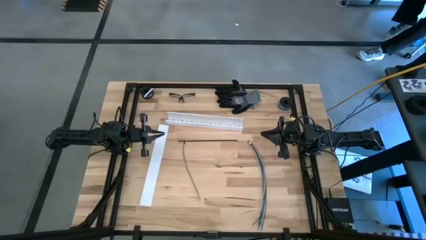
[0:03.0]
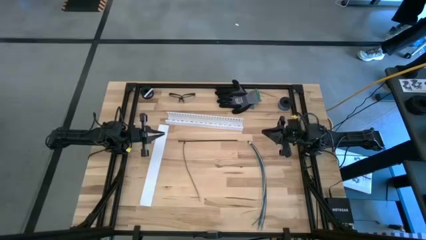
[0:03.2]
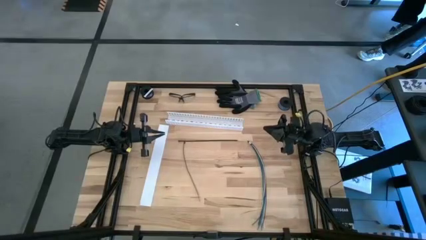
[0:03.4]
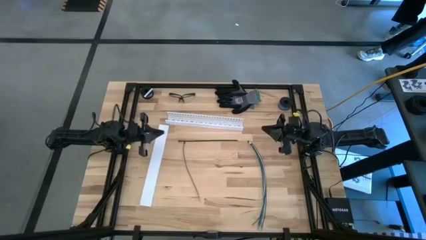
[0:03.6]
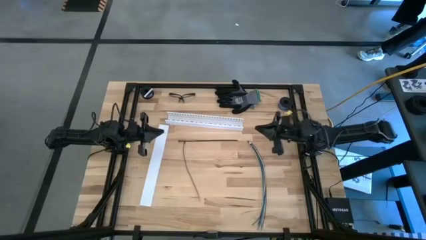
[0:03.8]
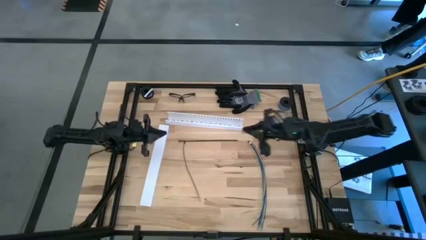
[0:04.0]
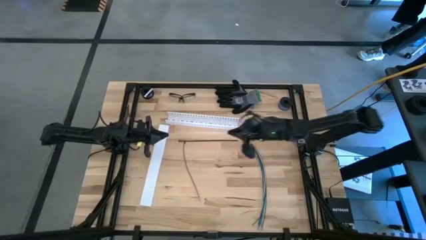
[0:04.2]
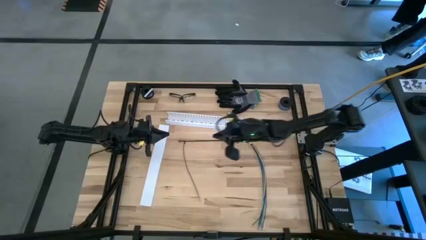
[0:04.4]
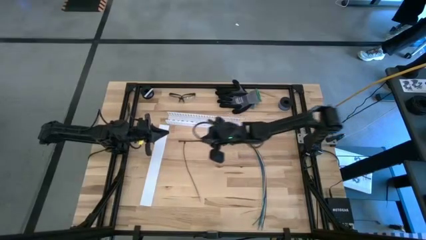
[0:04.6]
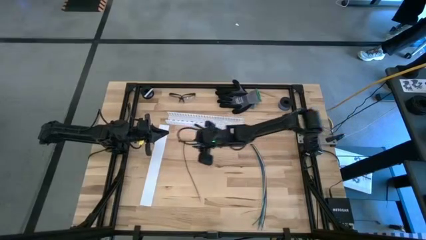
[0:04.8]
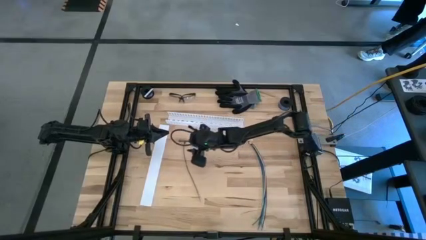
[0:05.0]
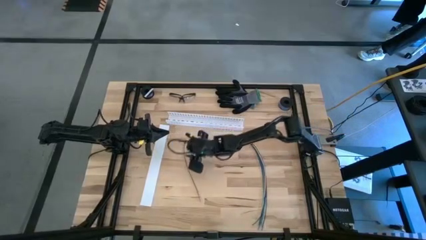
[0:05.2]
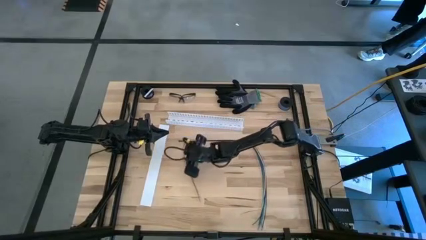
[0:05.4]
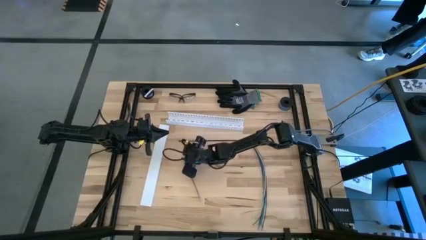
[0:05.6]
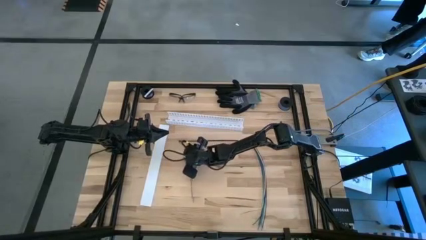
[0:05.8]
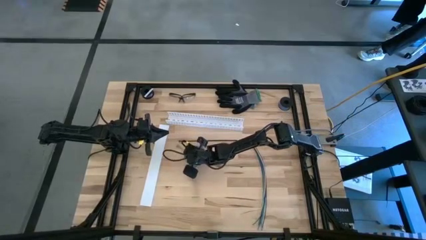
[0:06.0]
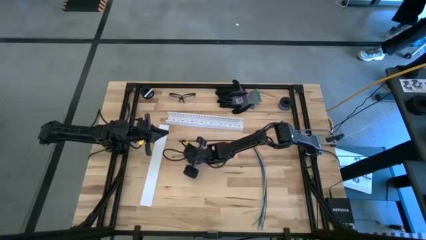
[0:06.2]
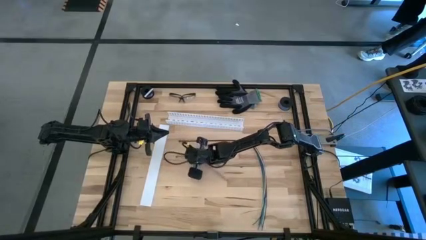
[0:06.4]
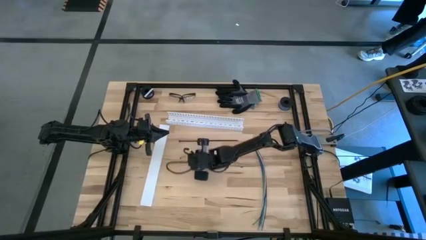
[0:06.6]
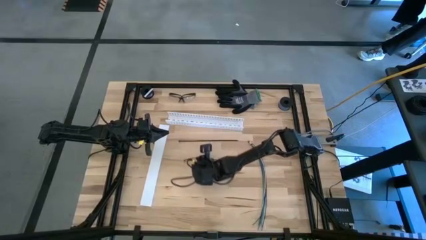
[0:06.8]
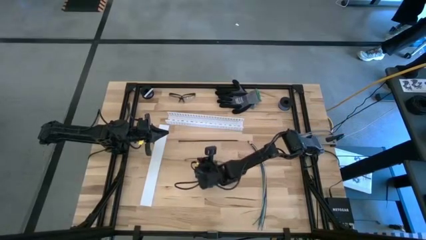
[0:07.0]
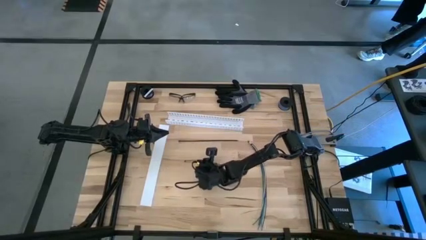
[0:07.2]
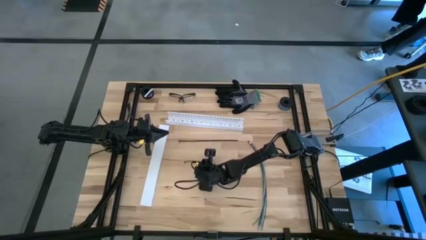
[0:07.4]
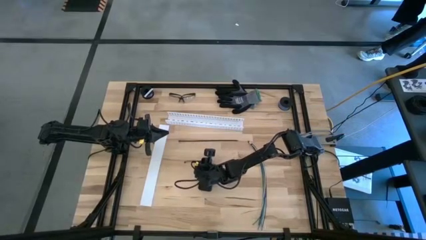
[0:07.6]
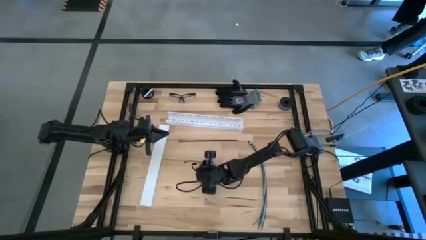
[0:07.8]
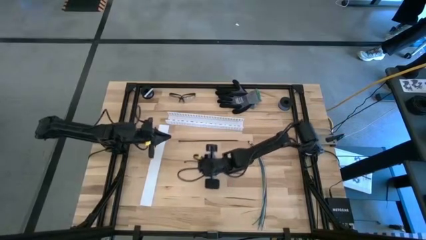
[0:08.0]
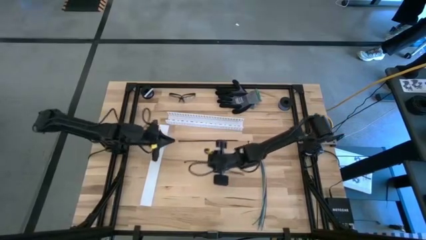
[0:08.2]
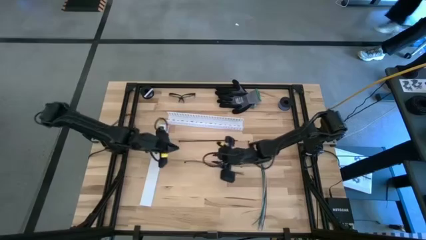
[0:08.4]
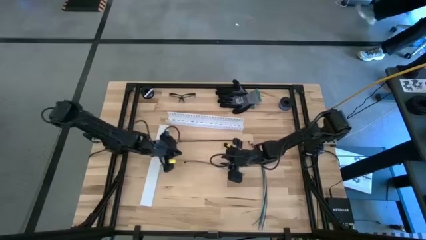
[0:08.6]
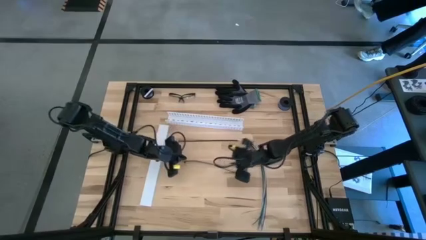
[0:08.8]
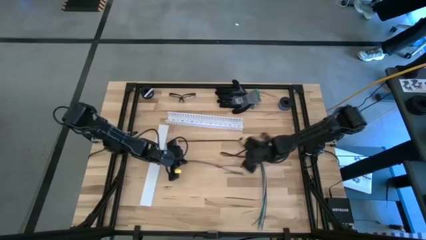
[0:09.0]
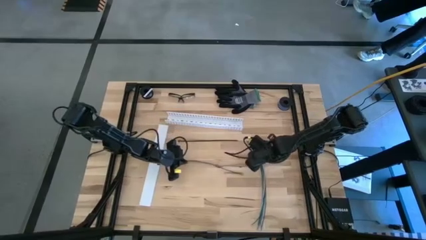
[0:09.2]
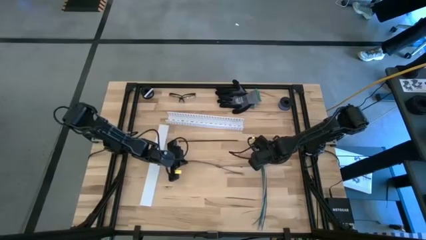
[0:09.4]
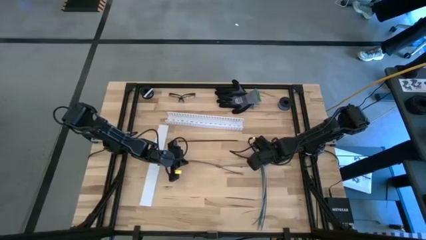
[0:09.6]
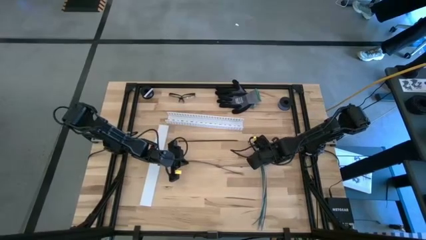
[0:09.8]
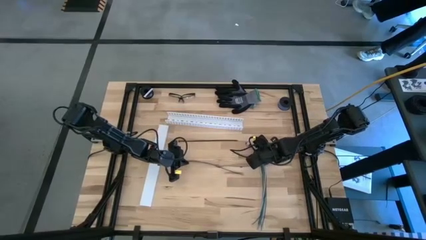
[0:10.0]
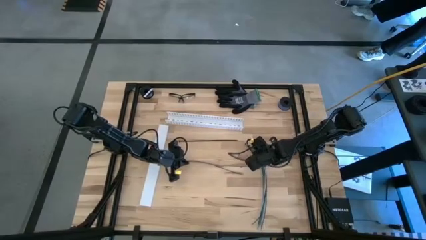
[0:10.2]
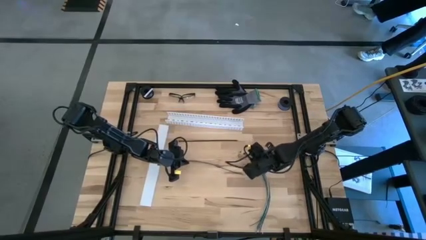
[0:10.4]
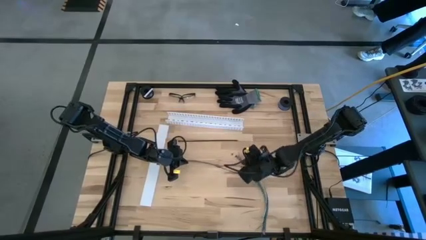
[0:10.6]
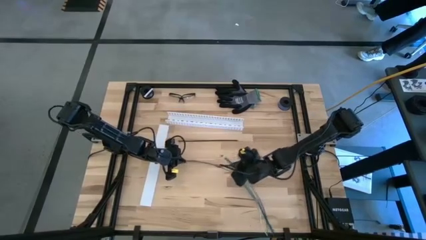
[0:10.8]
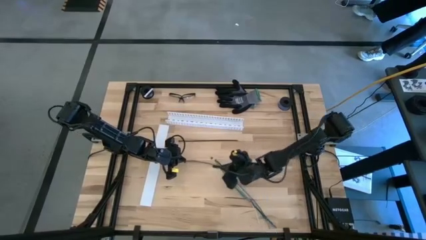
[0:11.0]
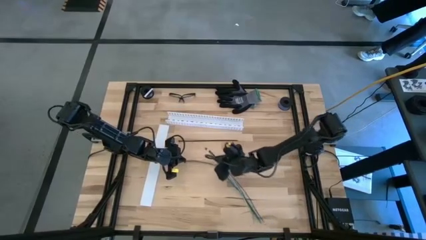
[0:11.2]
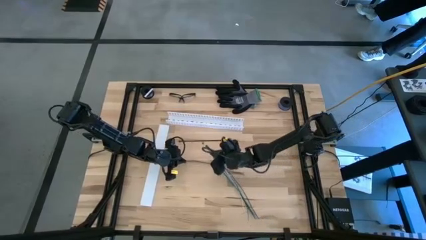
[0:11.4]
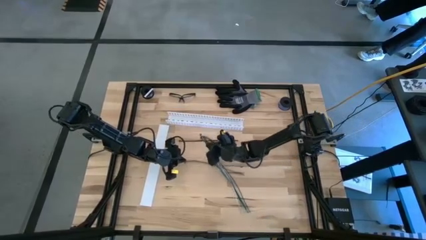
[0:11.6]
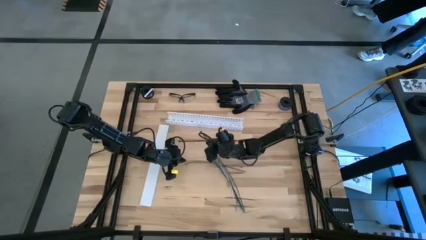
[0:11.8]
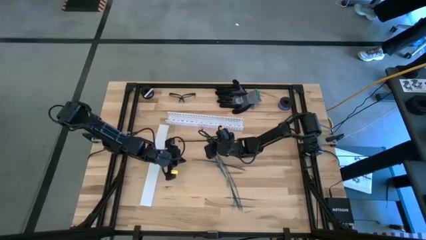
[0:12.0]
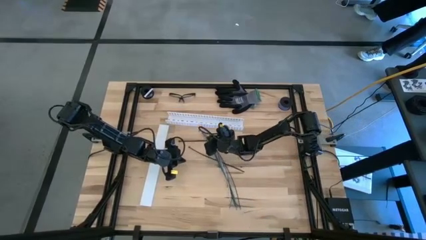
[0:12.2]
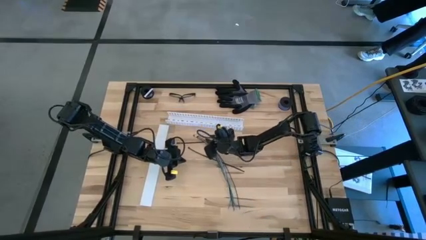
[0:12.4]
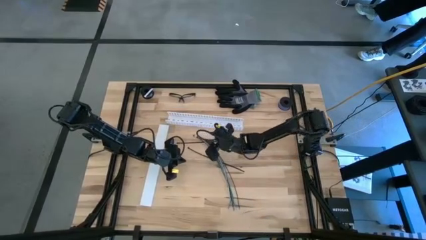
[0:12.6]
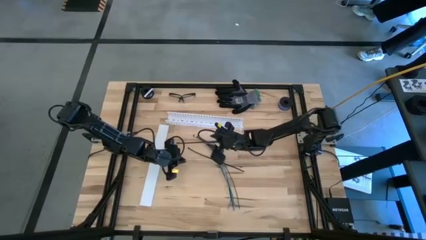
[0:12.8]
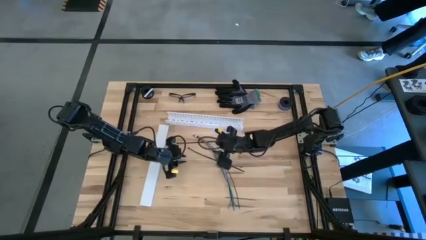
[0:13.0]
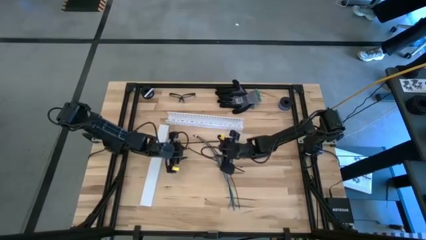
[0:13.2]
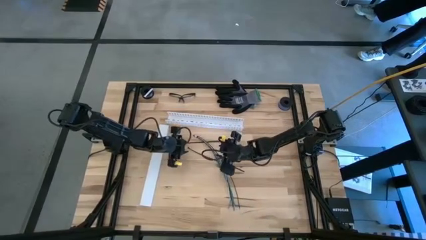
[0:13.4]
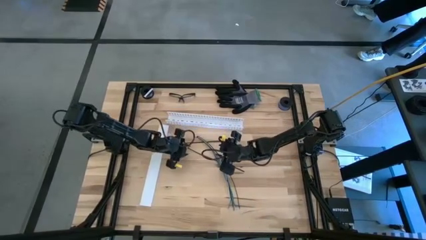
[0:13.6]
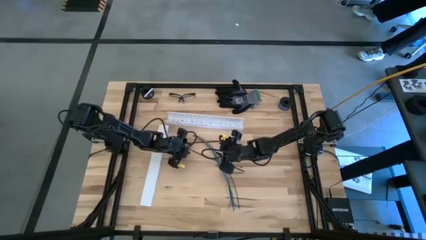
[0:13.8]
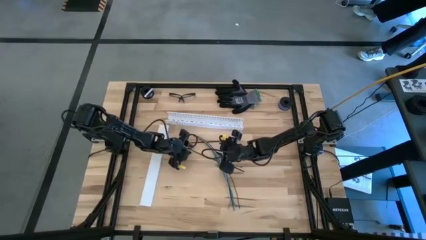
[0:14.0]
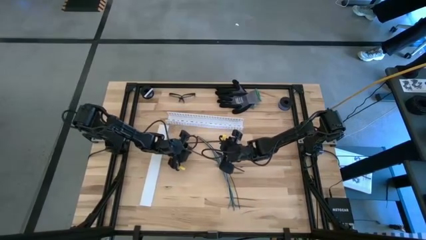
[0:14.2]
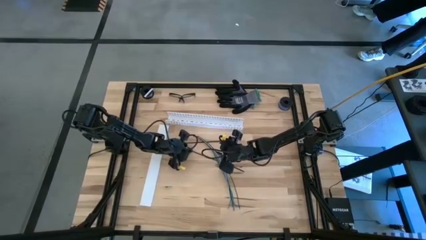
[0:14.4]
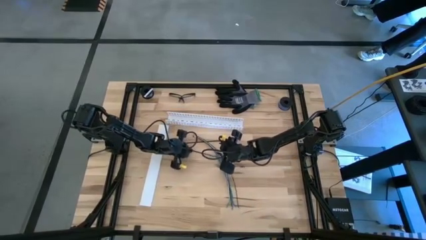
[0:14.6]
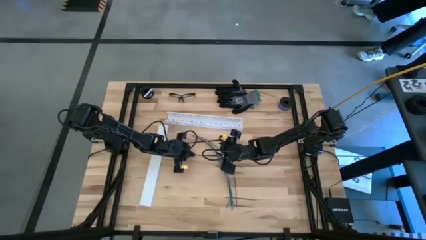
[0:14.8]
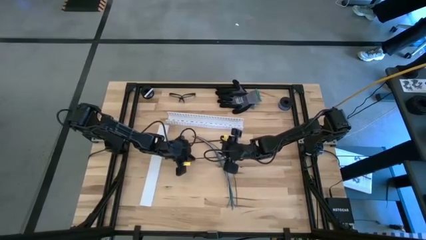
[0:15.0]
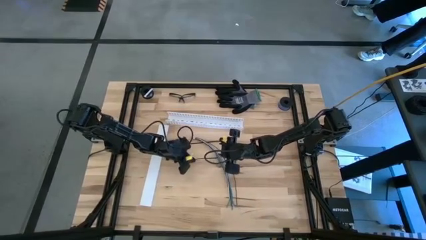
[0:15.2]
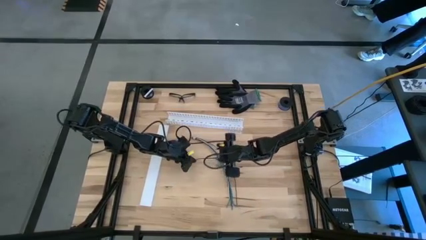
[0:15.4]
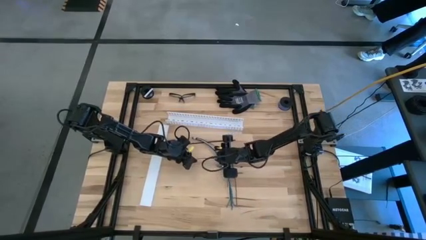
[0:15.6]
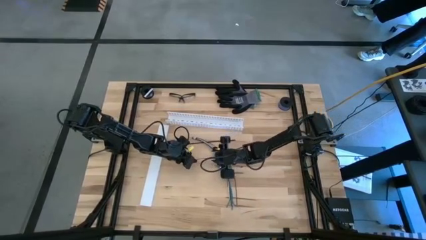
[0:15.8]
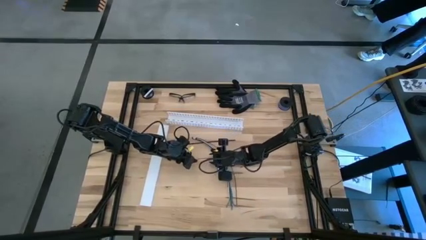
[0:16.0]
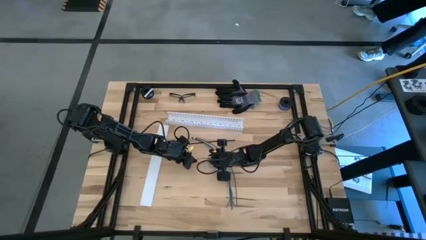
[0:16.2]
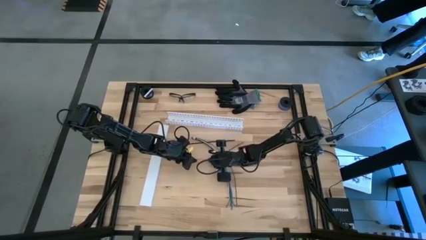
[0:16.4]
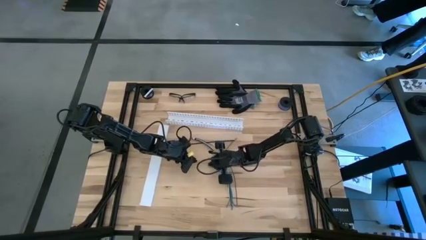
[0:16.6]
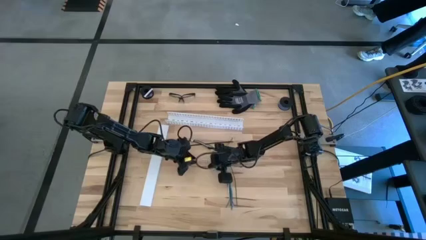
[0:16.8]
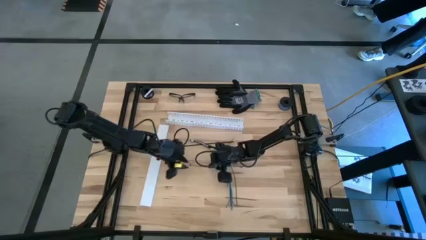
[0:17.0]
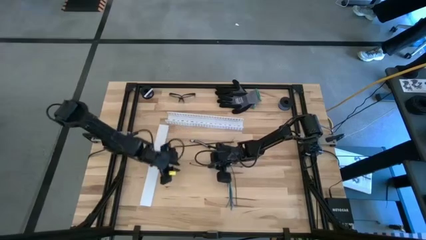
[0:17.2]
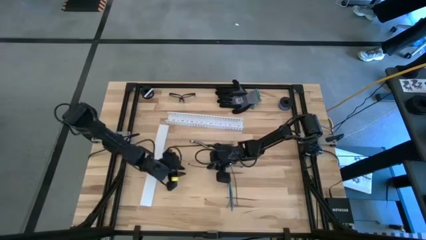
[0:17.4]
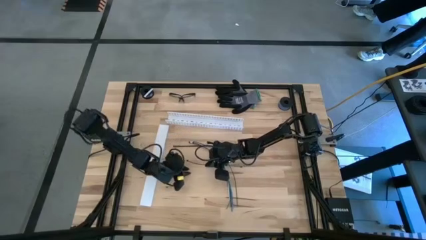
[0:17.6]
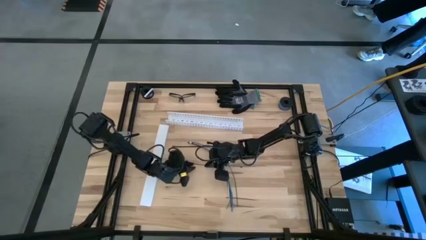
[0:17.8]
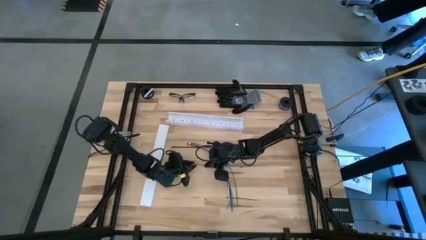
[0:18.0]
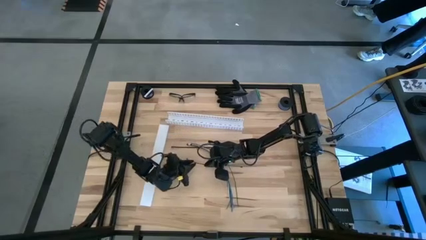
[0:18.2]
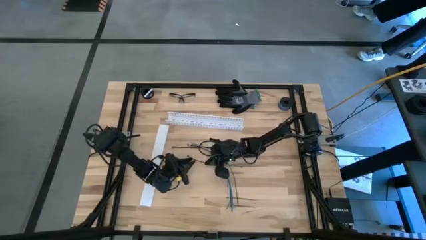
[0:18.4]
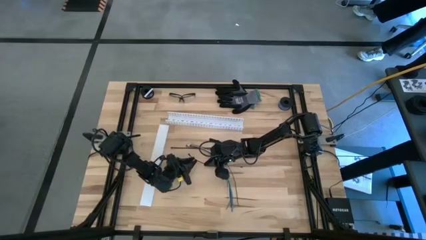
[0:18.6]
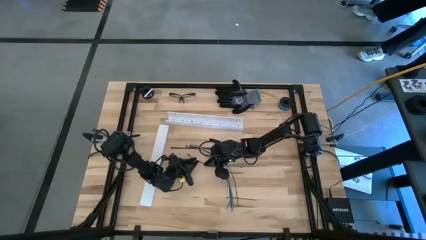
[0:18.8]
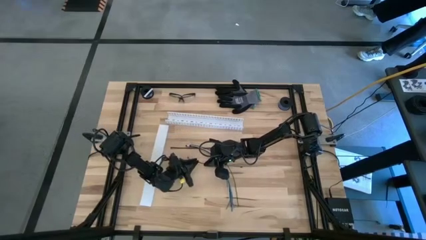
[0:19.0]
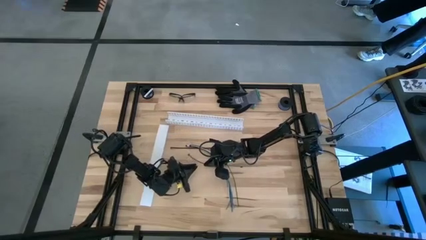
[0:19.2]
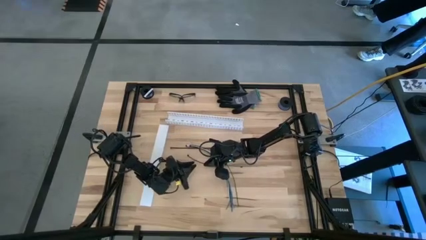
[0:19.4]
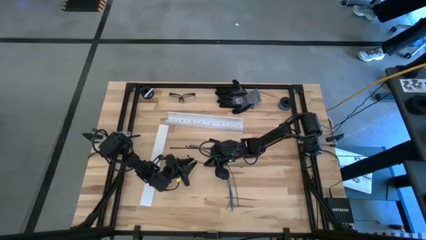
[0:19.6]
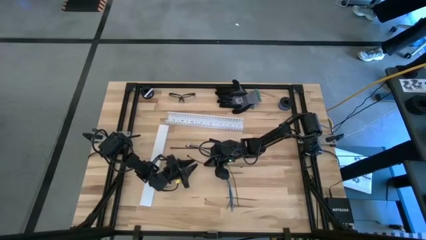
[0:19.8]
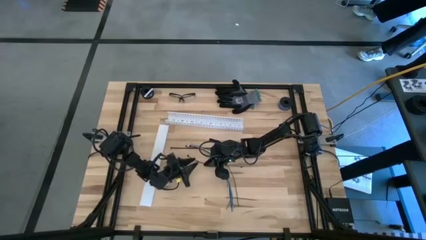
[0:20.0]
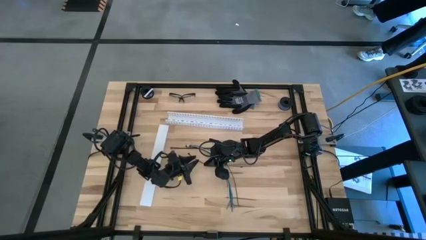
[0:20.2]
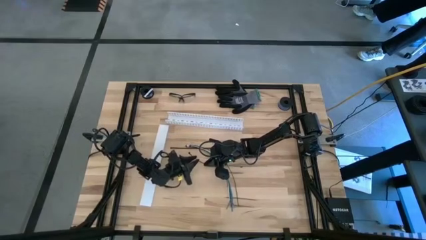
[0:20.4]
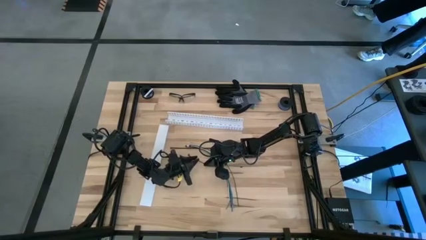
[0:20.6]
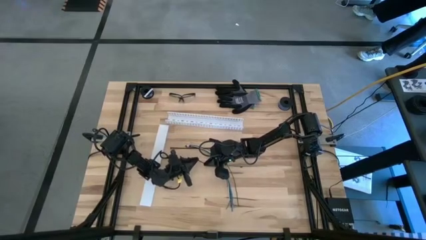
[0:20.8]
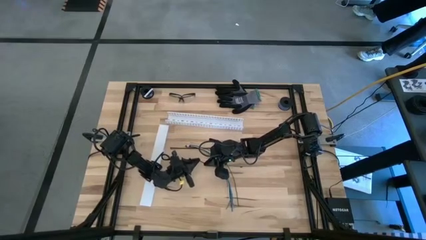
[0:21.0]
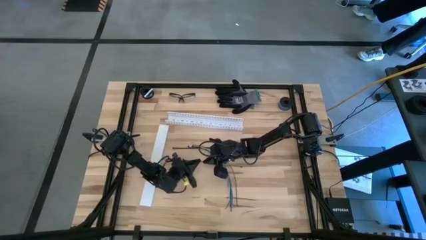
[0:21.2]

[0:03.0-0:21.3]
Task: Ziptie cables
Wrap the black zip tie on the cable
